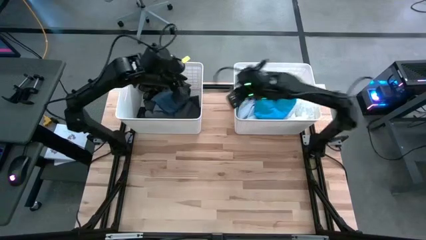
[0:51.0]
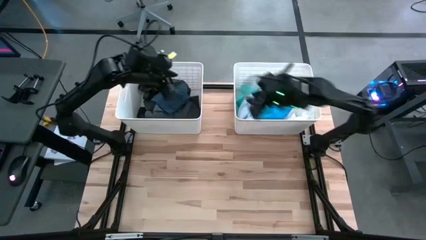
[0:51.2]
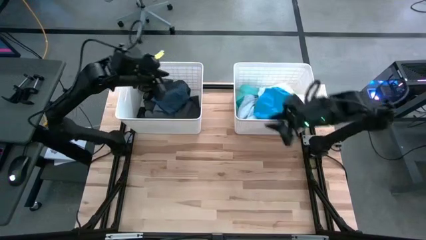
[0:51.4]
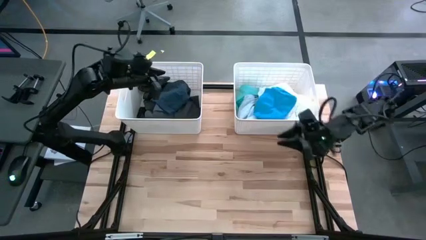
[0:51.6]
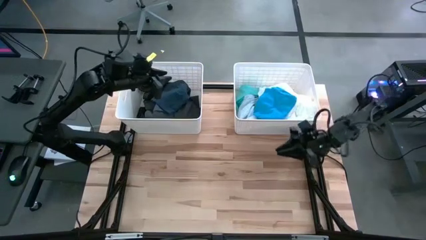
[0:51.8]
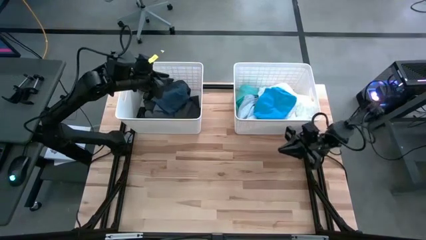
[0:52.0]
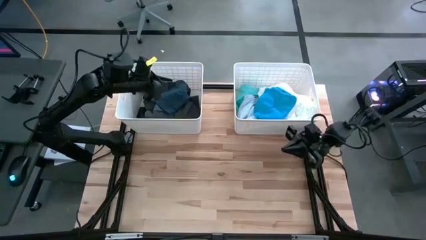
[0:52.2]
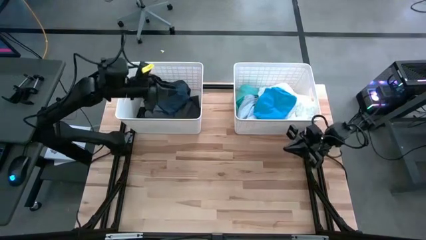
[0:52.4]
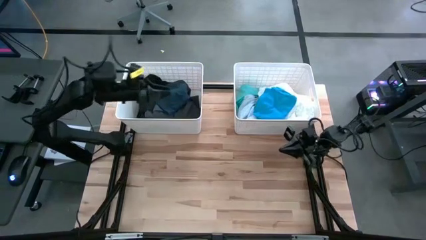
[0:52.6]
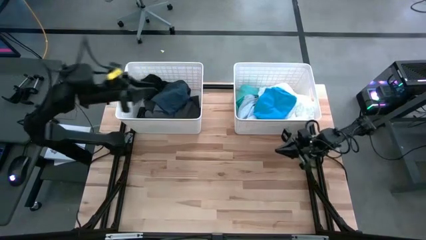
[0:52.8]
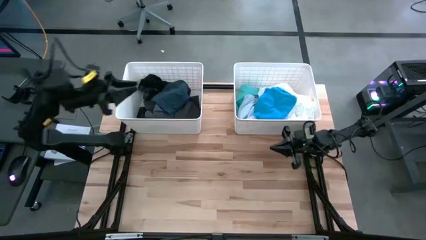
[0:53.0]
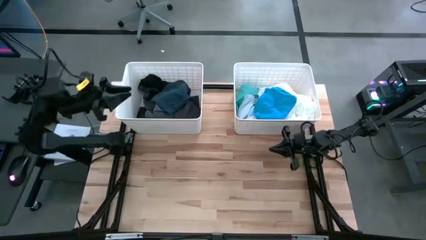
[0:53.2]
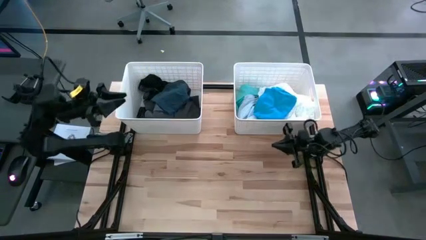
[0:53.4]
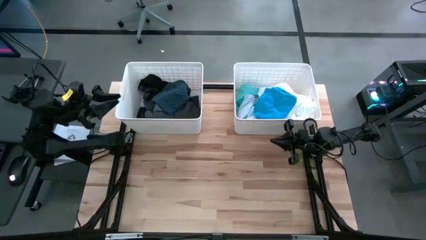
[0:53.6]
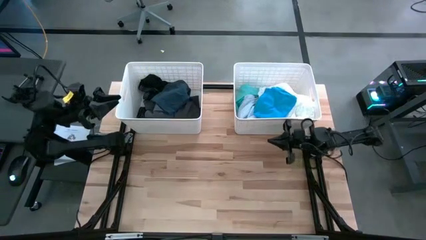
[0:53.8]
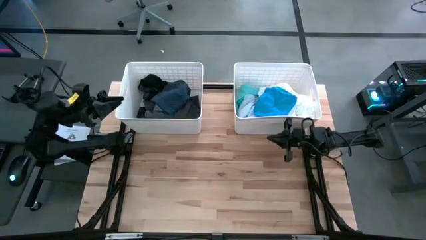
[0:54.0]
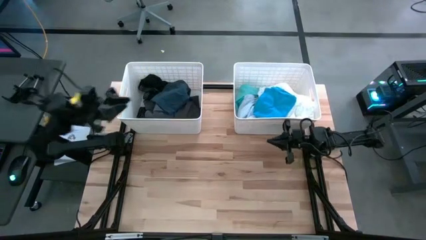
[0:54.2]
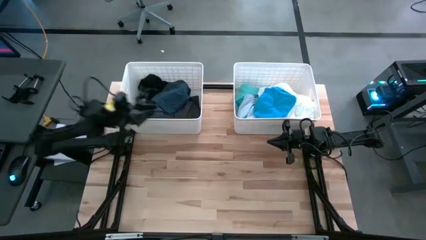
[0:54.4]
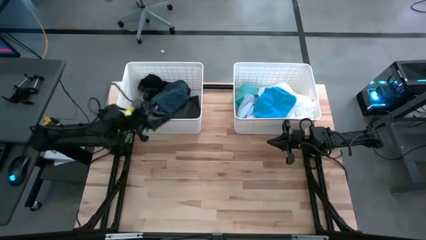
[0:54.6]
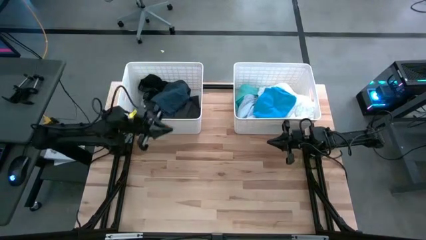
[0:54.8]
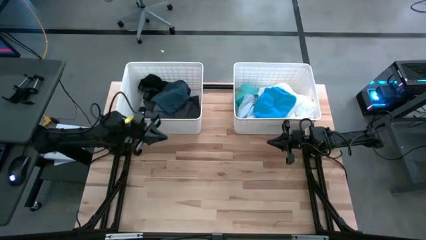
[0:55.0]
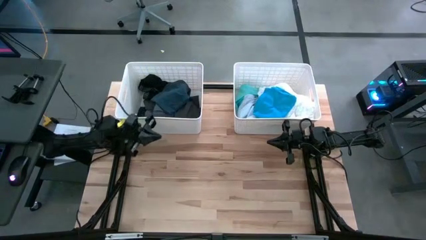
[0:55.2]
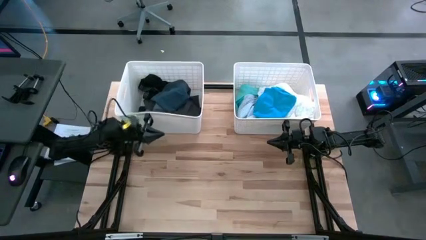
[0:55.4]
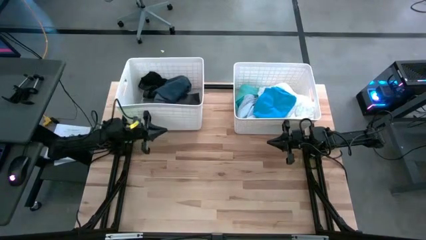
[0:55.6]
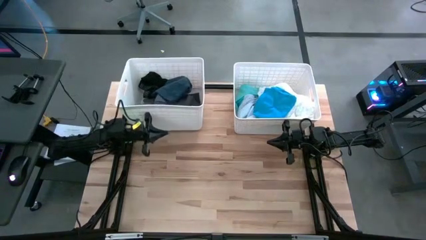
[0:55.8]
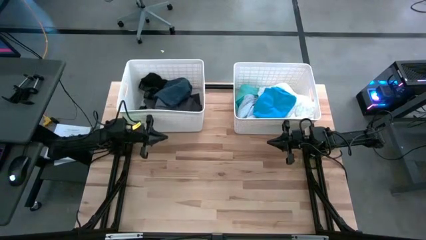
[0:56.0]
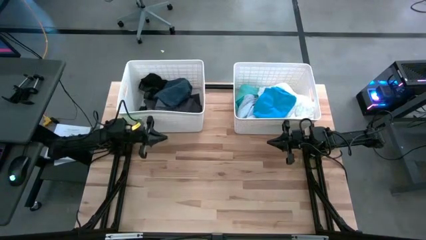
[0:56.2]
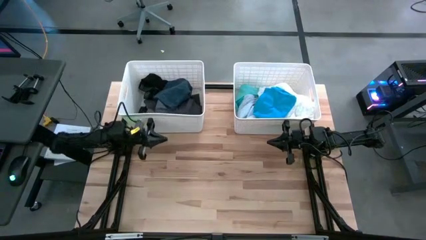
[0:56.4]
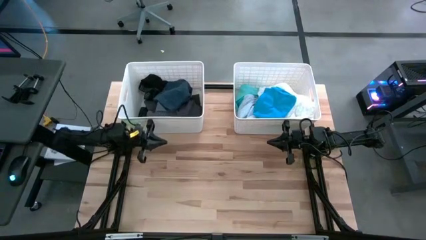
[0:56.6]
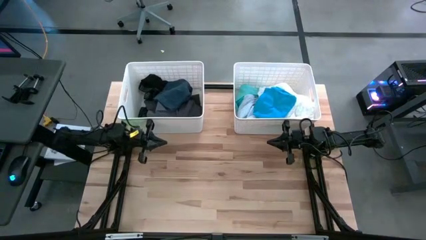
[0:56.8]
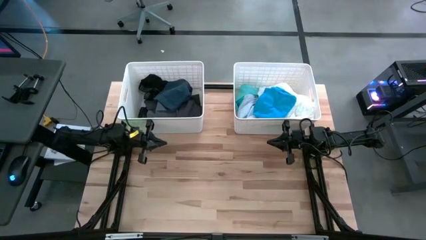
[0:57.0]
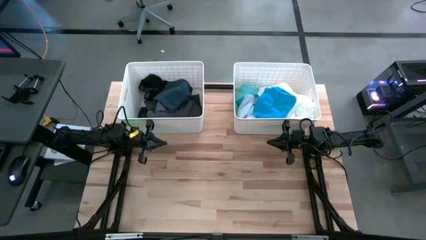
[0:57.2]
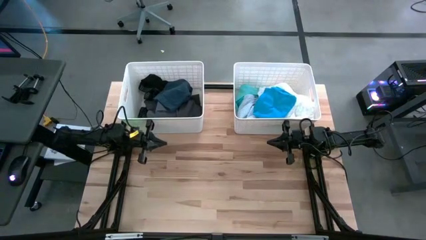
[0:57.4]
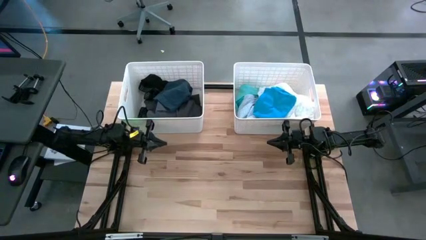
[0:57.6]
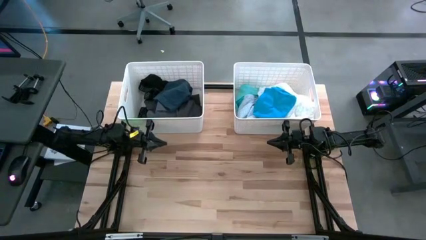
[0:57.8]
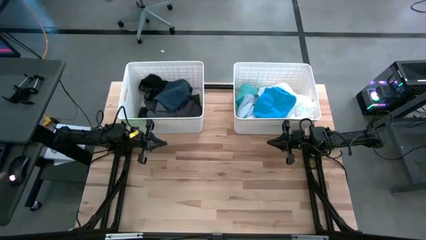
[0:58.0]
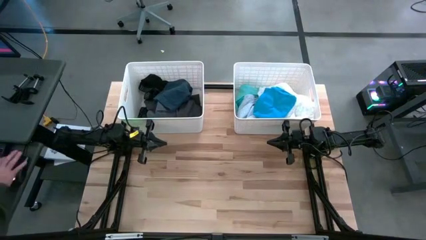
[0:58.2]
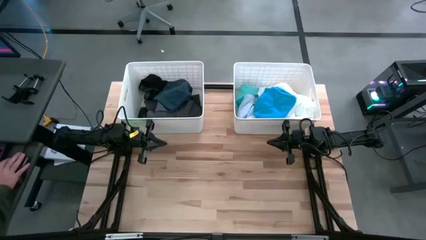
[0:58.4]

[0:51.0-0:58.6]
Task: Sort clothes
Return to Home Position

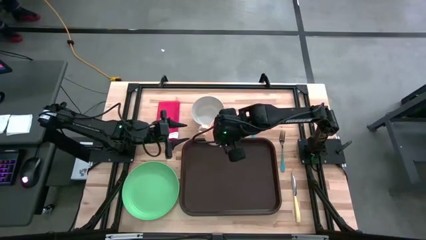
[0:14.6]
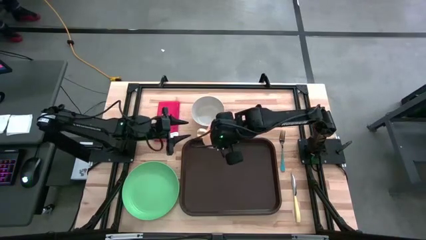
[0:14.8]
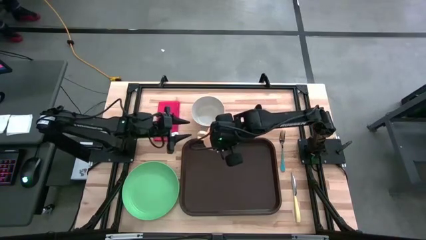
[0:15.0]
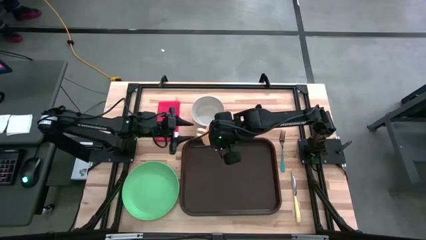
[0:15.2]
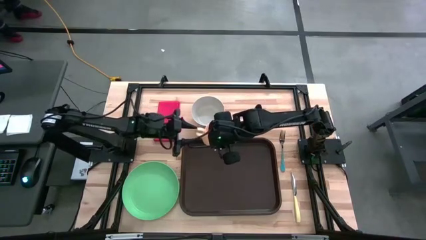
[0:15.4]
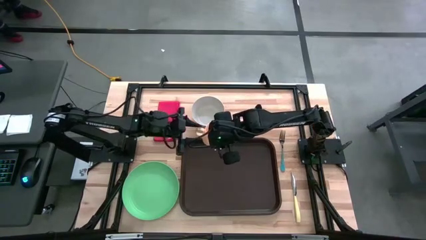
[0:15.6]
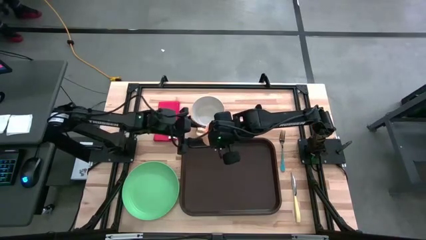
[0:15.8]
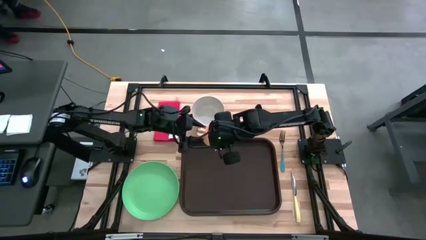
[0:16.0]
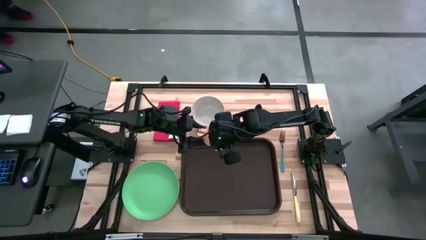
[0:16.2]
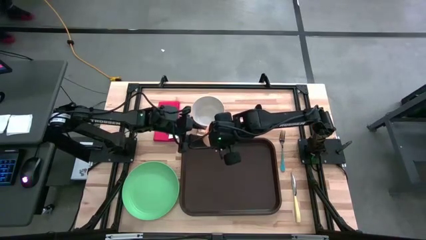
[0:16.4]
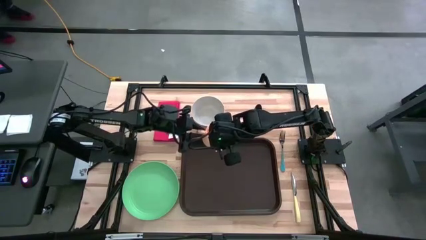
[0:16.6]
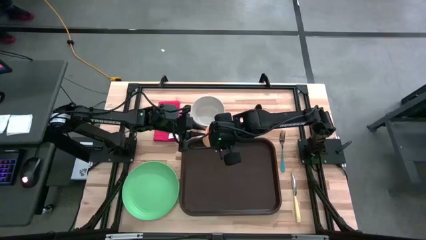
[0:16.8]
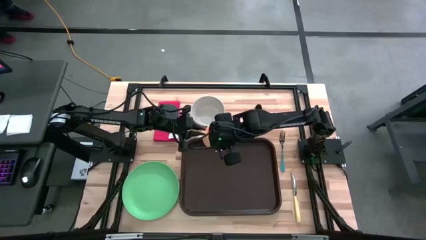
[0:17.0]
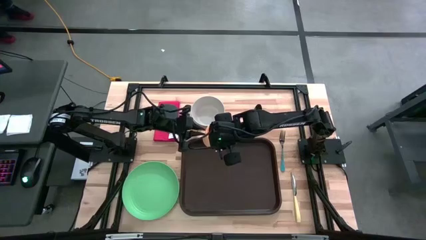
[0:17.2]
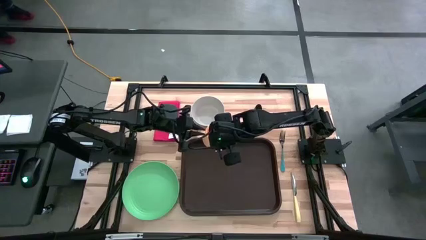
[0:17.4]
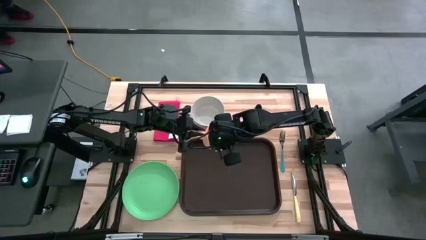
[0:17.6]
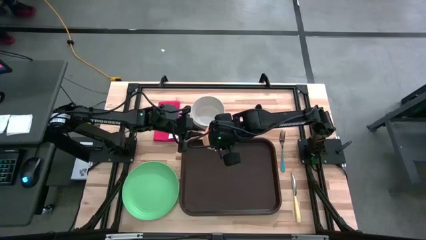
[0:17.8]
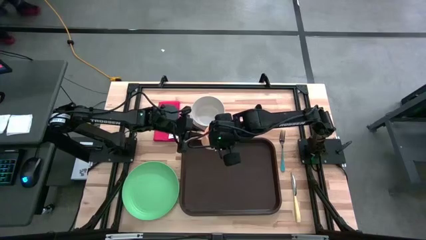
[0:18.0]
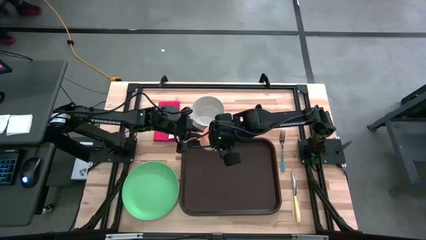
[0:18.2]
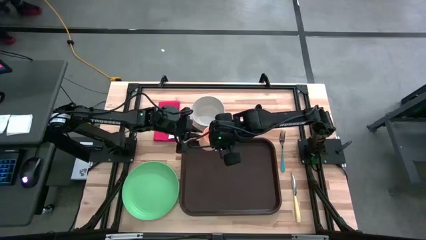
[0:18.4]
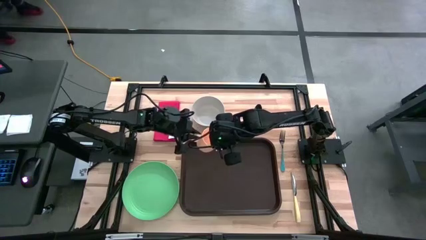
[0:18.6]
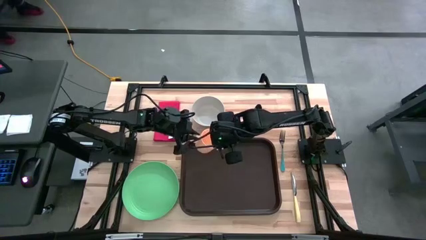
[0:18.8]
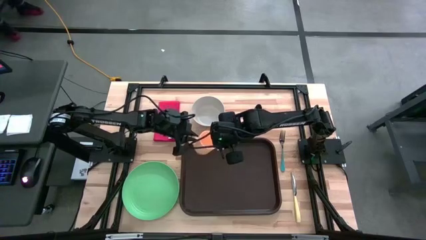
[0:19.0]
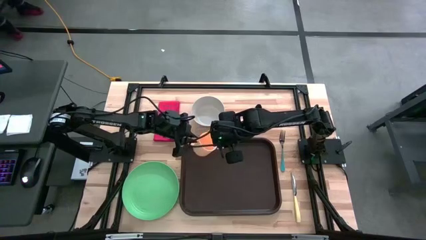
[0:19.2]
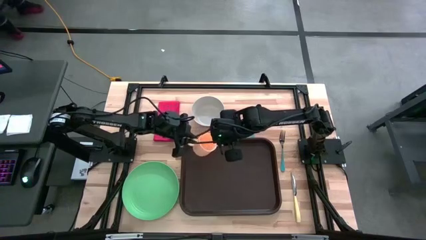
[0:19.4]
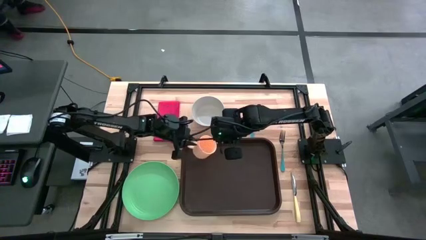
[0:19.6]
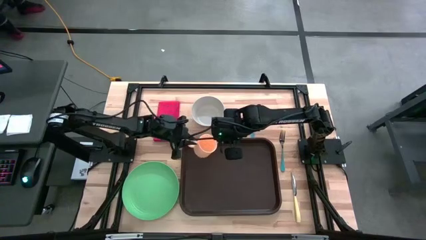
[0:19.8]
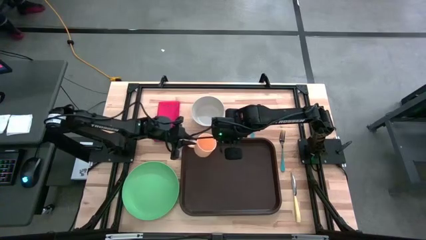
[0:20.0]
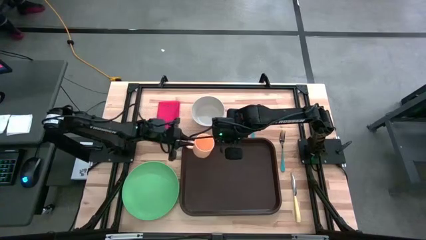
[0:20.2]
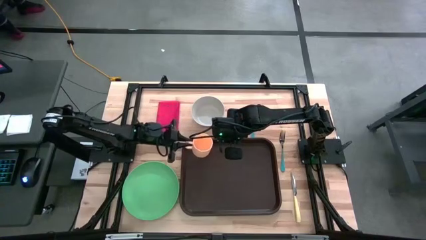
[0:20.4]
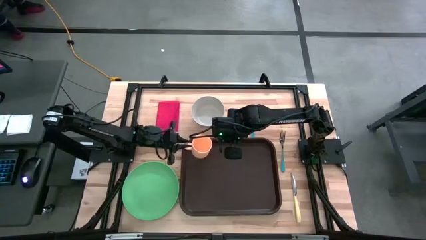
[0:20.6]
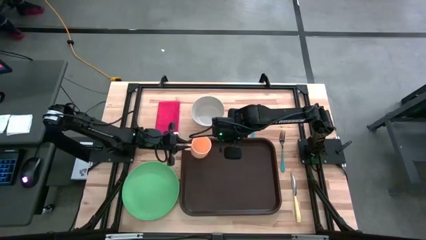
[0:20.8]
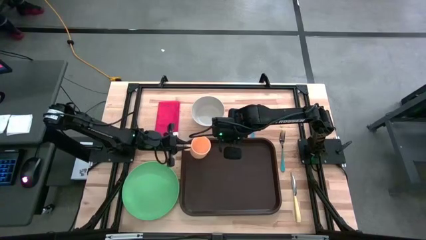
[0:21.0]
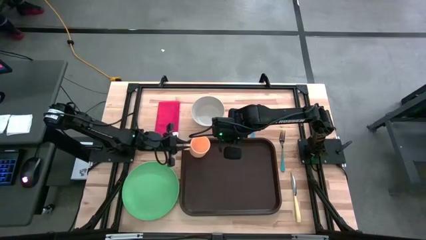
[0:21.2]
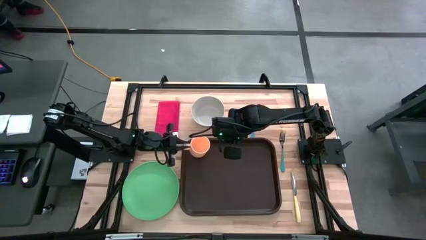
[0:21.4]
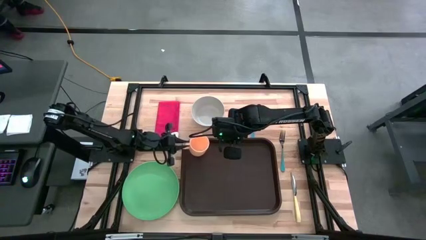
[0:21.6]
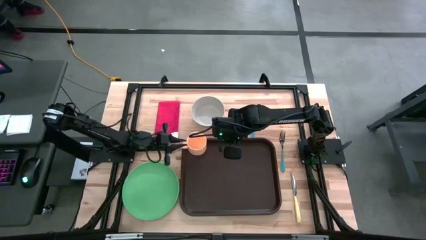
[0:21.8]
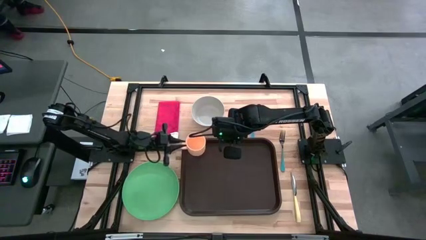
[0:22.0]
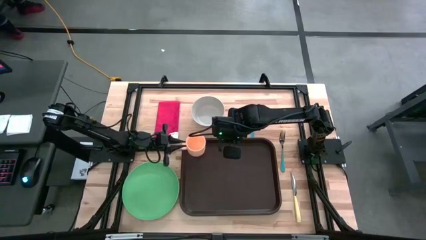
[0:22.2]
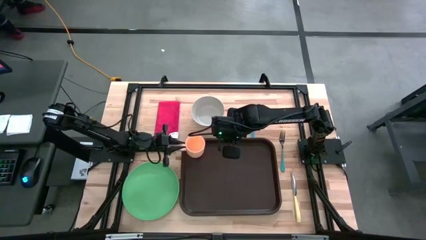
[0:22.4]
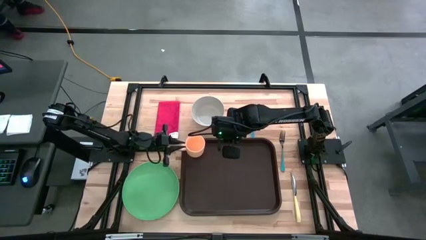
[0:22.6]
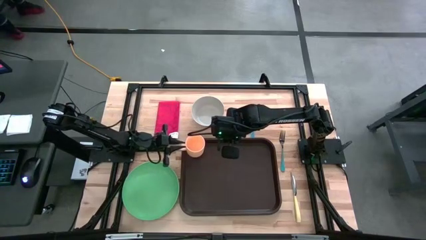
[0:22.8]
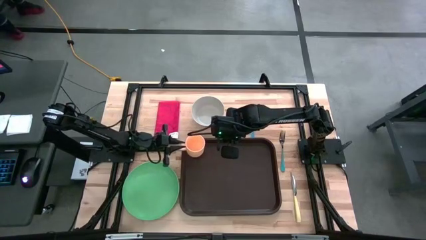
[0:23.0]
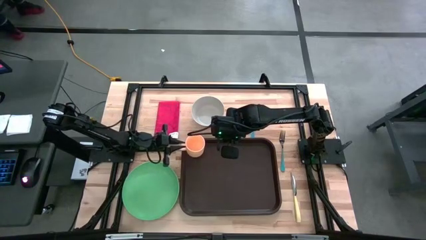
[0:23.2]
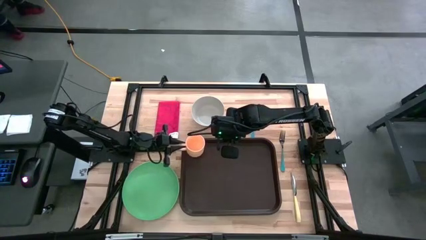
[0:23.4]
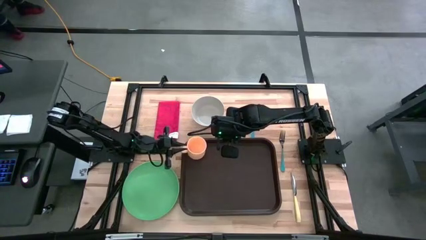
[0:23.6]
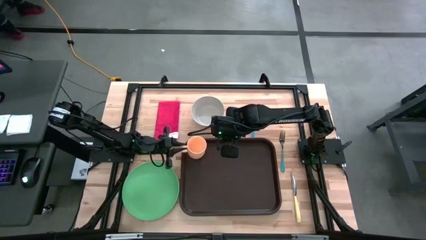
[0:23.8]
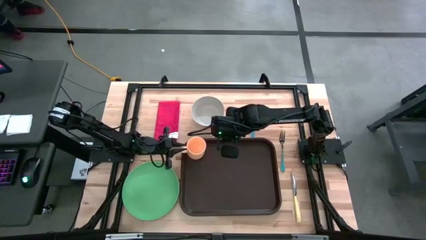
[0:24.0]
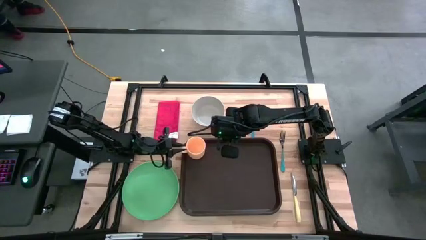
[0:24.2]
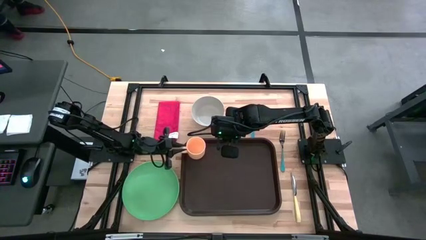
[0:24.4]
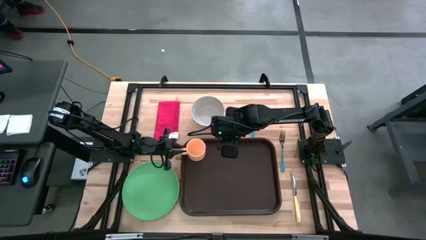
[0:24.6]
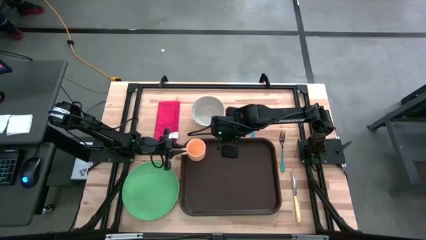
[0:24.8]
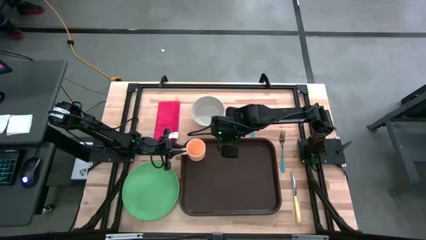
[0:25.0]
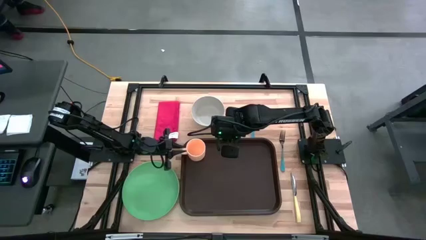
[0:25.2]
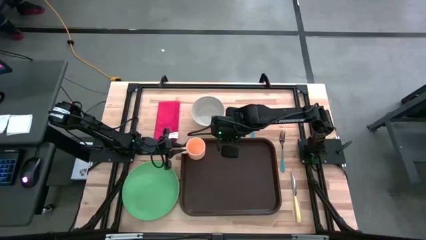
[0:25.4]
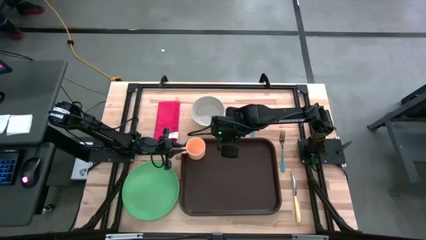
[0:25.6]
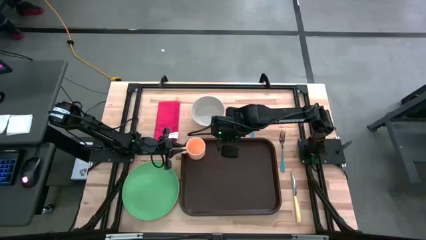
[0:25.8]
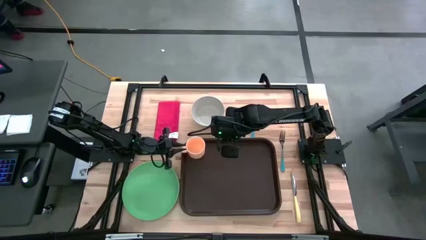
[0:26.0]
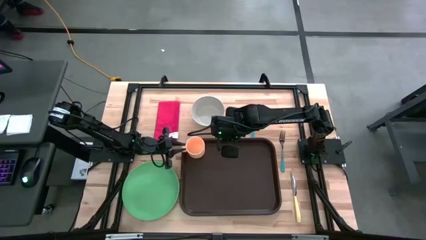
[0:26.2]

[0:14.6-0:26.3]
Task: Set up tray
Put the yellow cup on the top left of the brown serving tray
